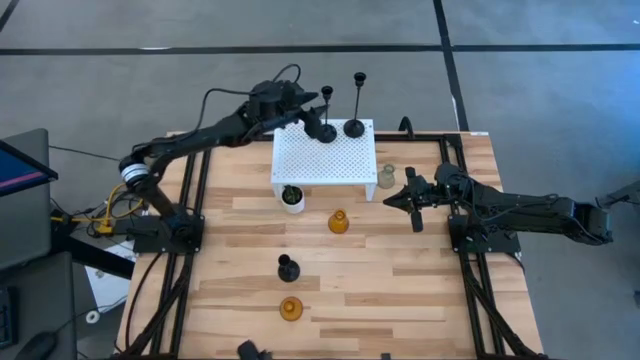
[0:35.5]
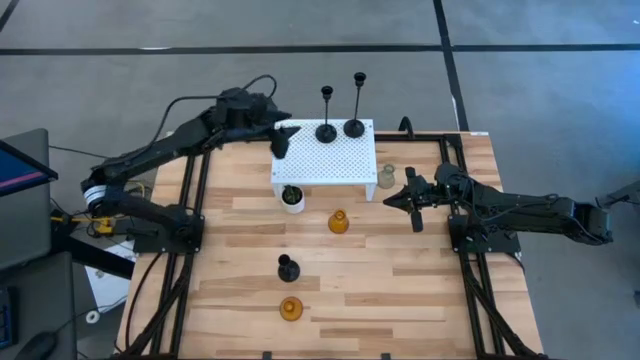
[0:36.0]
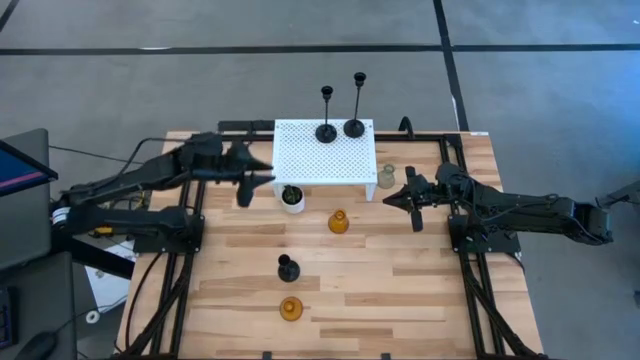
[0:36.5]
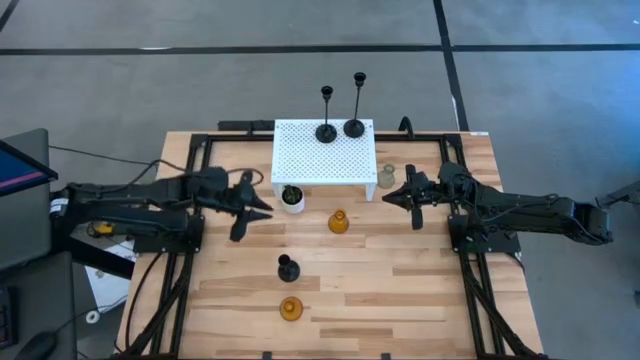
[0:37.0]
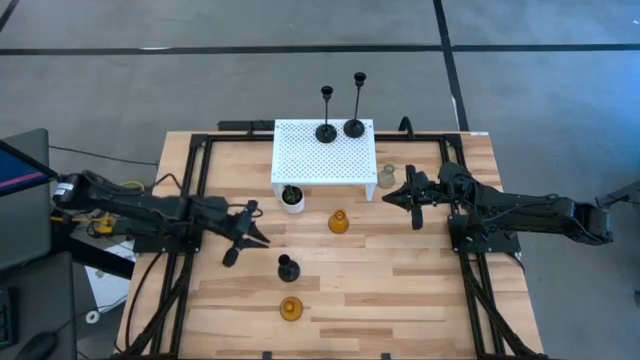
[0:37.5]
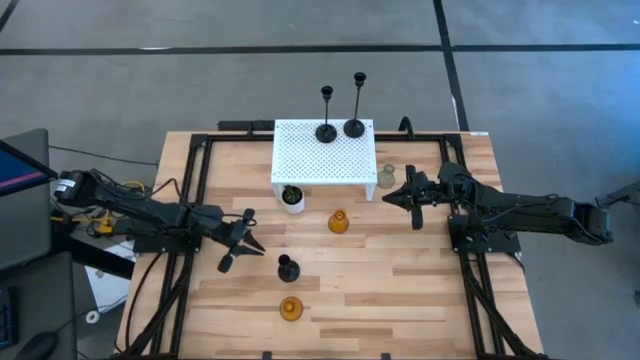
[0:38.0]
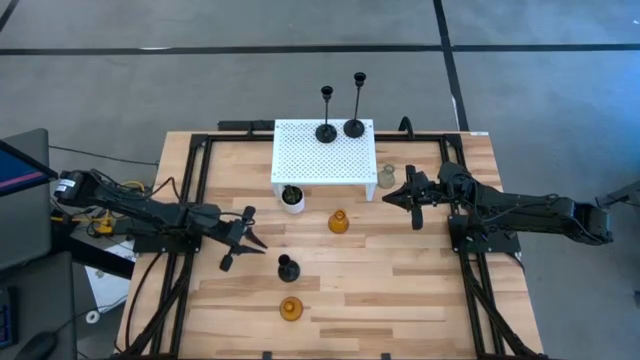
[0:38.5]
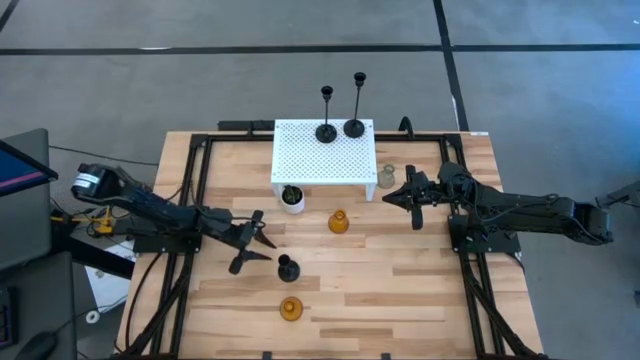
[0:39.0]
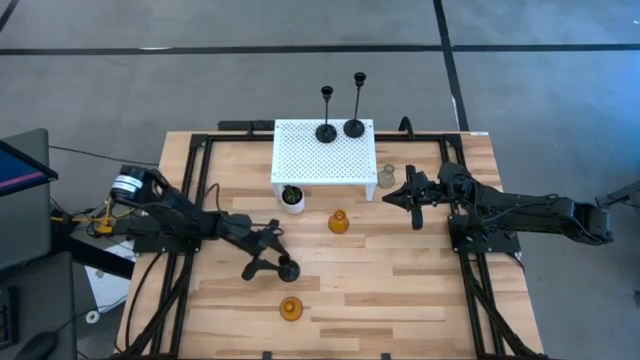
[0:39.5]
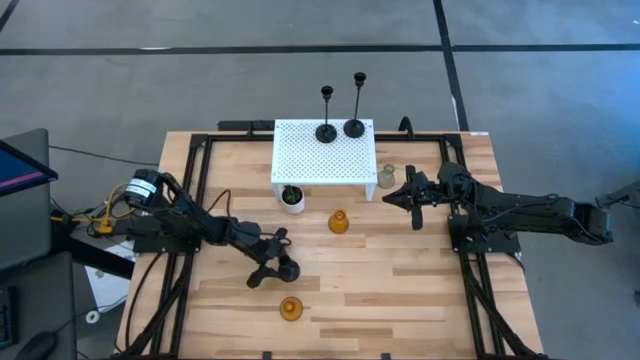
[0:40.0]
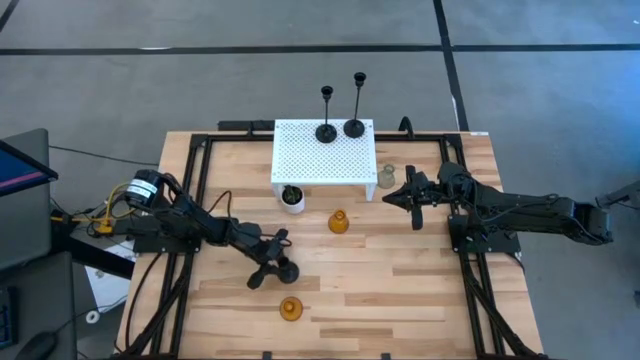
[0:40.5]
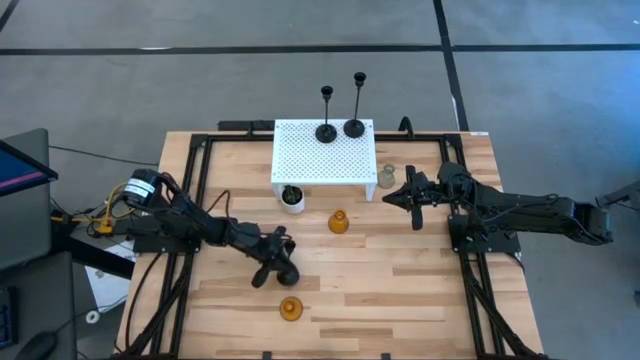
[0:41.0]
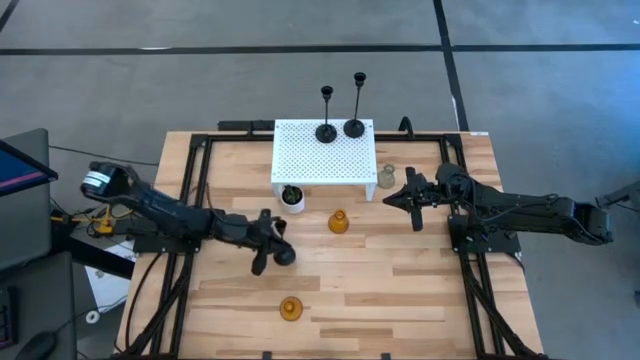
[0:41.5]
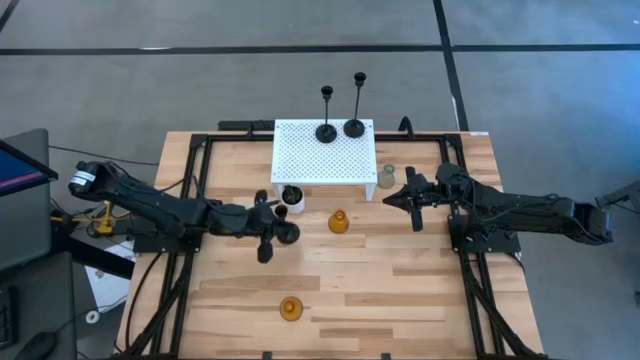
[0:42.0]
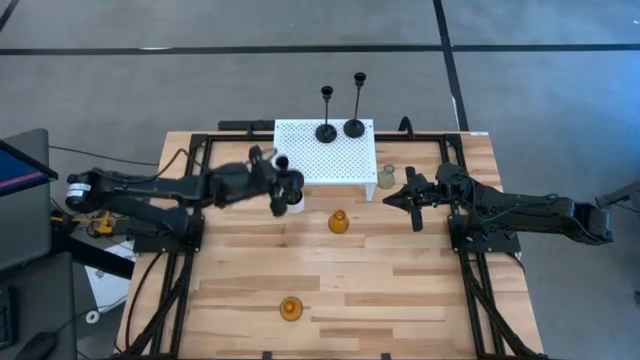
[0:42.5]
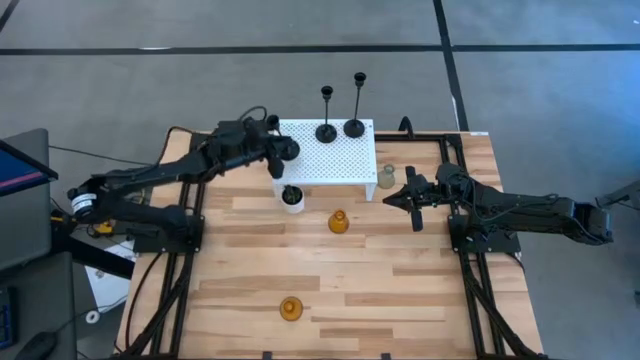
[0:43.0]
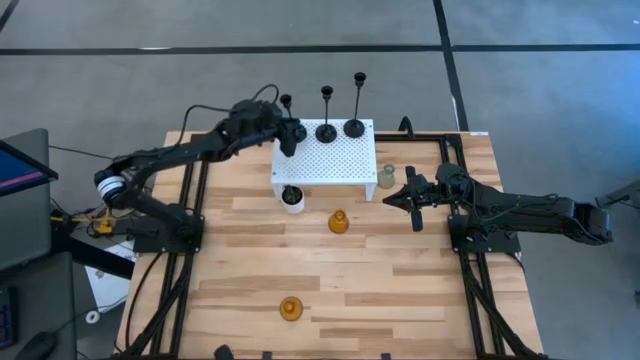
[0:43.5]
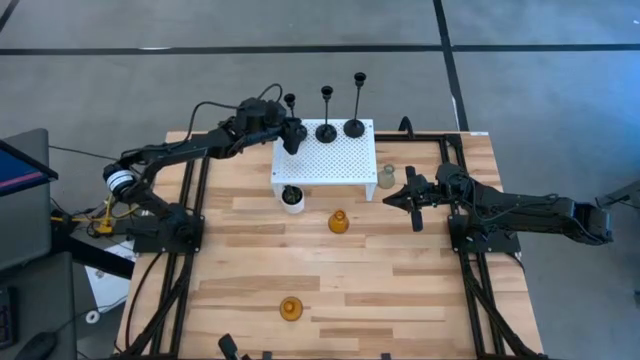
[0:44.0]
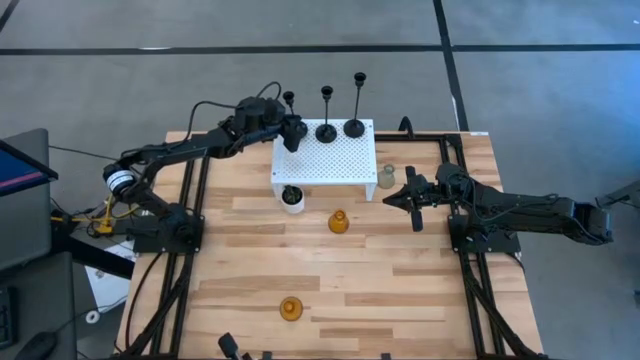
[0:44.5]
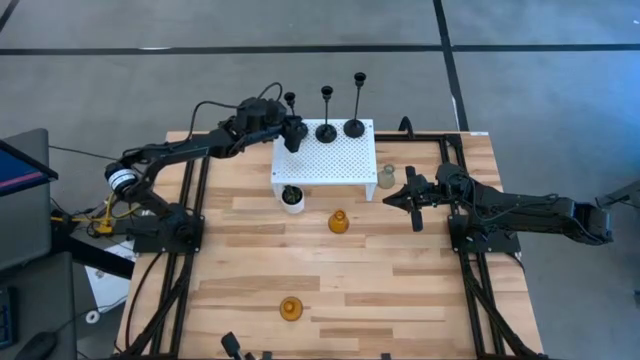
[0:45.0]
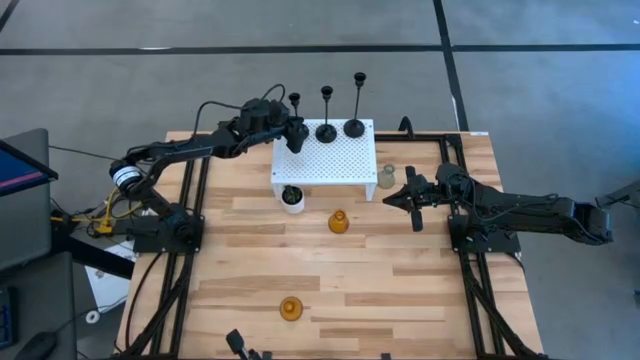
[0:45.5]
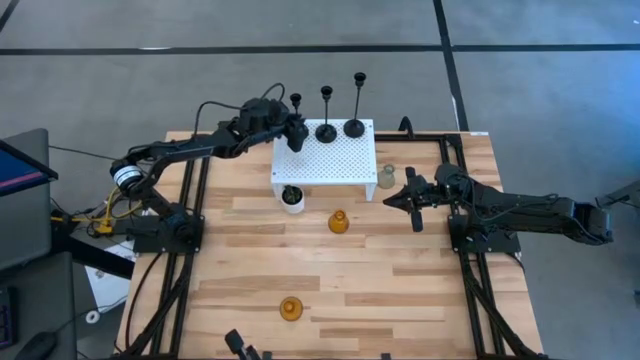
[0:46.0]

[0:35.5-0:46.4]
Task: Pick & Place candle stick holders
Put the black candle holder on the shelf aligned with the other black candle holders

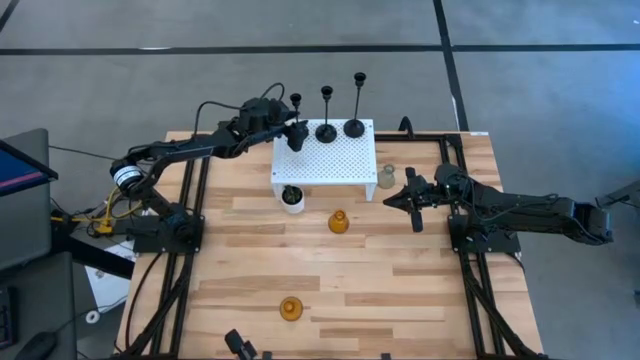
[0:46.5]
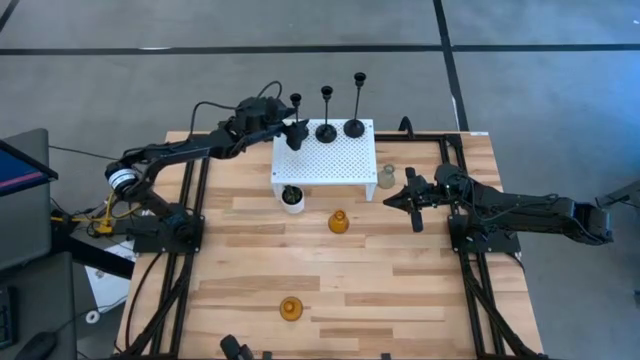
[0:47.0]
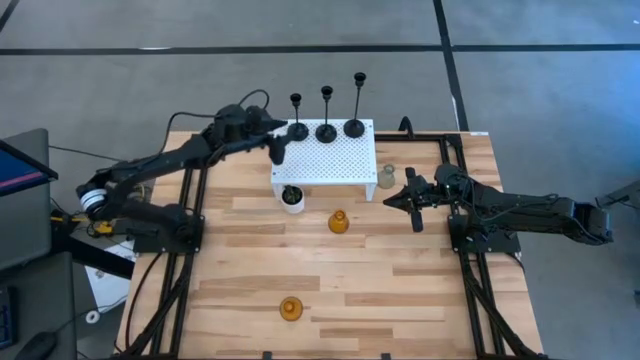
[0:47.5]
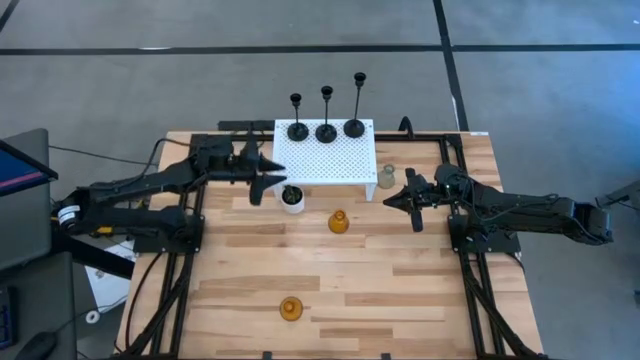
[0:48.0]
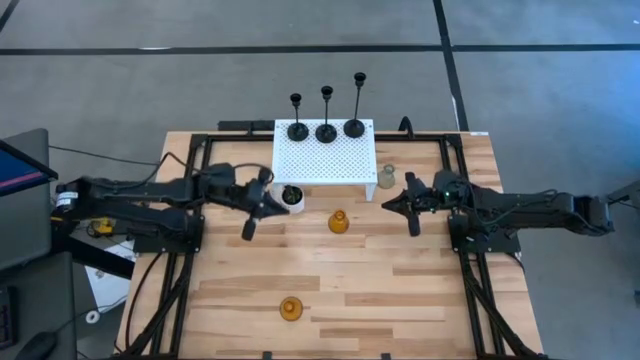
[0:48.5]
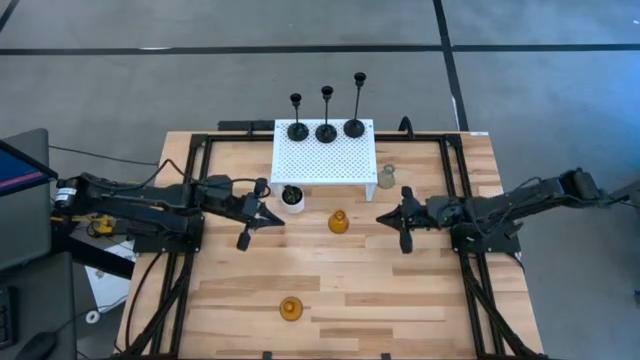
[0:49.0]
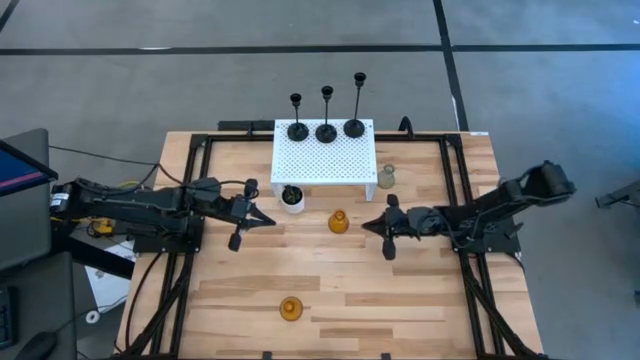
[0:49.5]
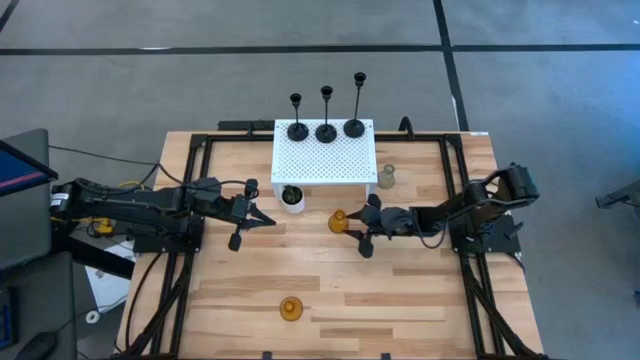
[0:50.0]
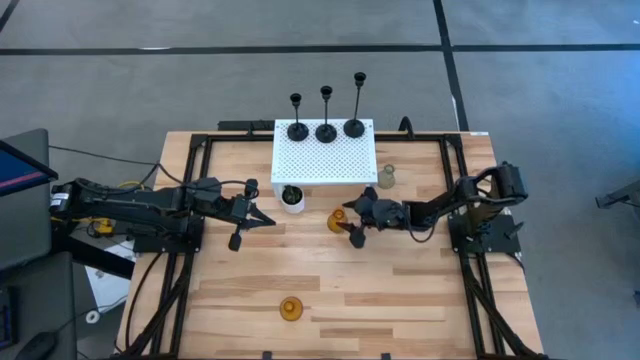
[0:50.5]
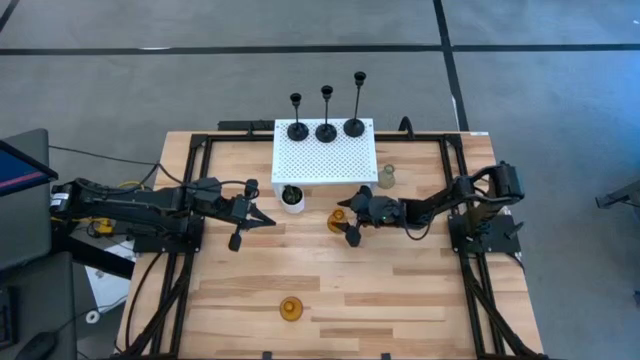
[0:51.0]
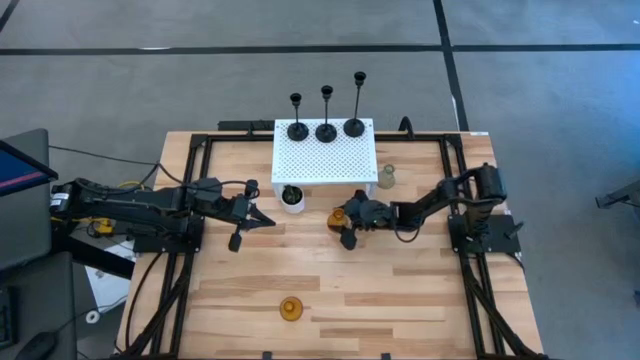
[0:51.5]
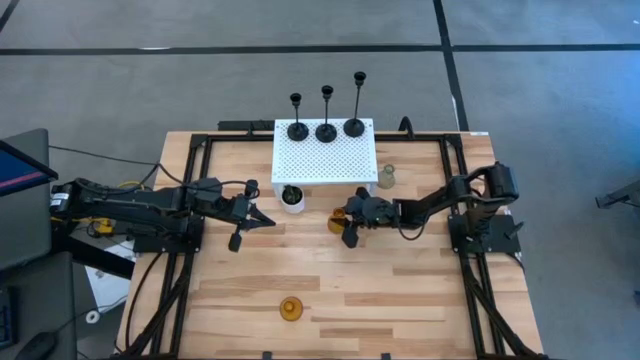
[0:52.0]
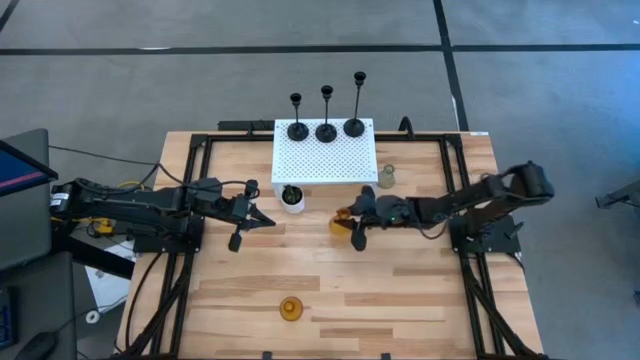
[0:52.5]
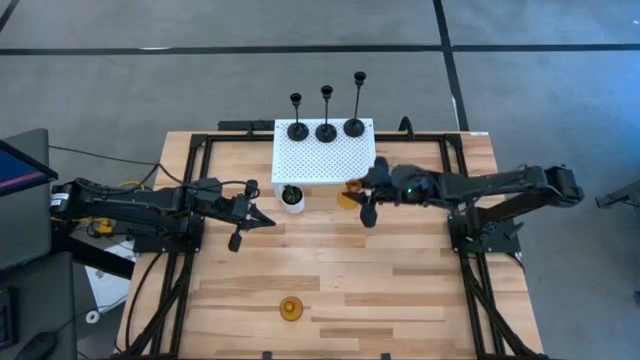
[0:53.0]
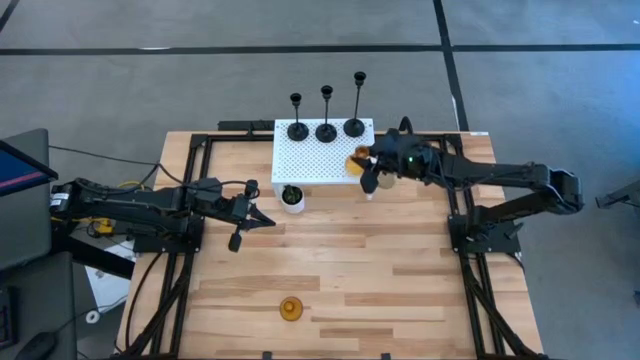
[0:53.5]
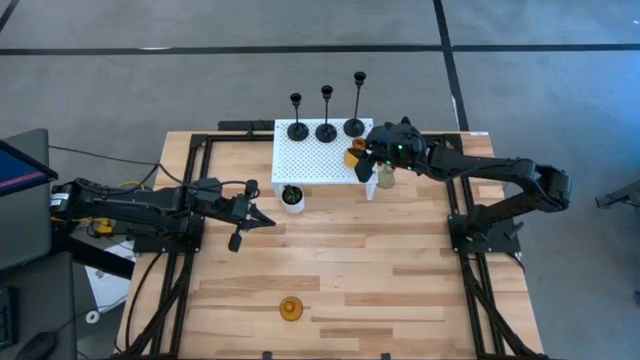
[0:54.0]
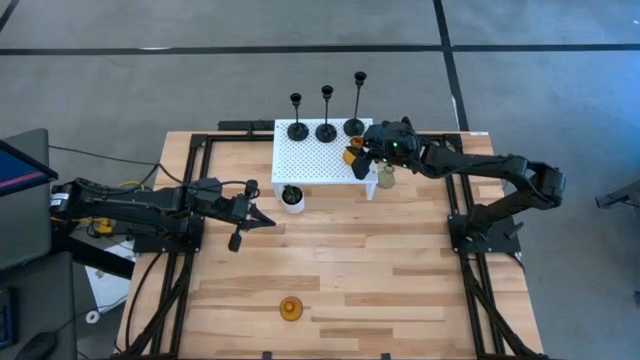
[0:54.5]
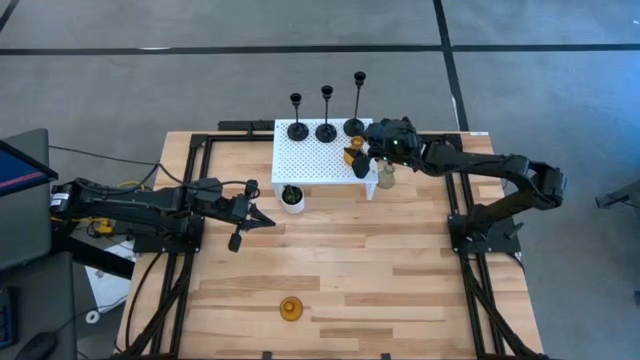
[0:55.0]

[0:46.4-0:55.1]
Put the top yellow glass candle holder on the shelf
